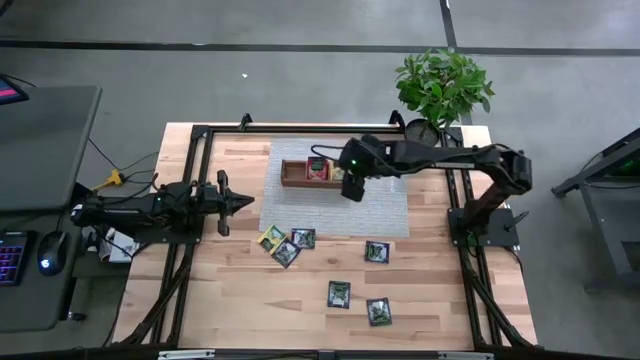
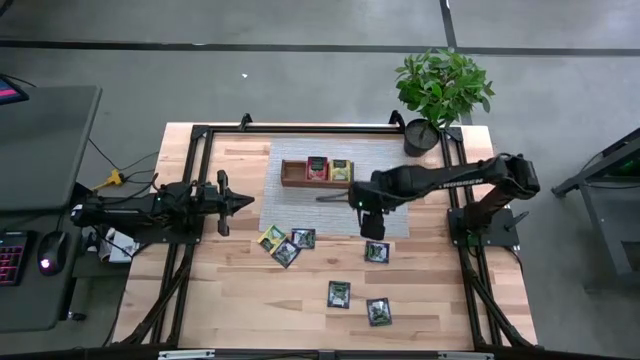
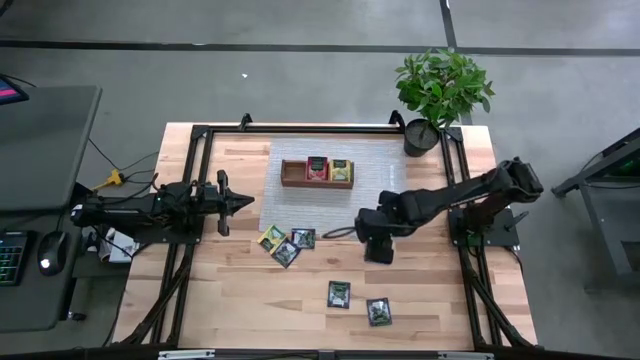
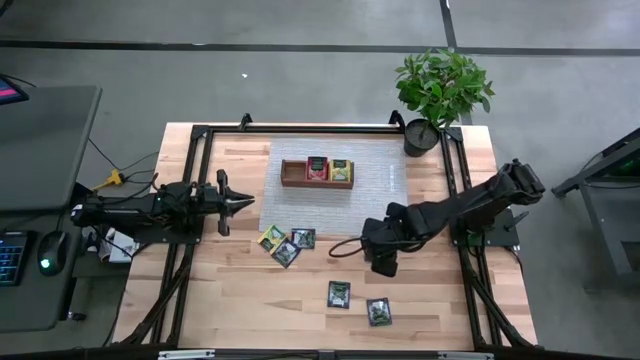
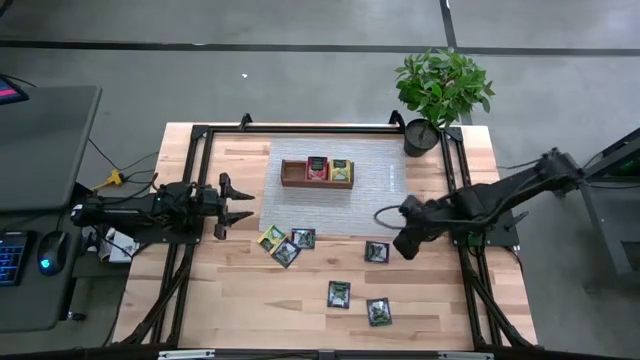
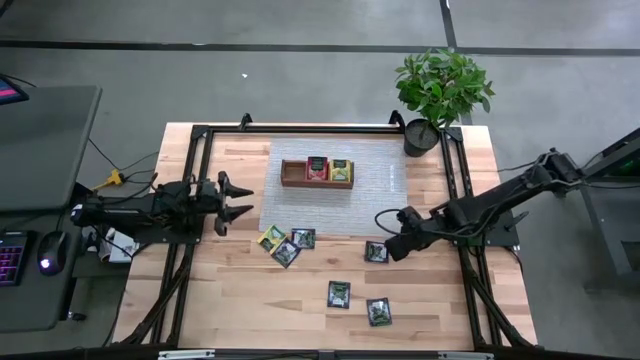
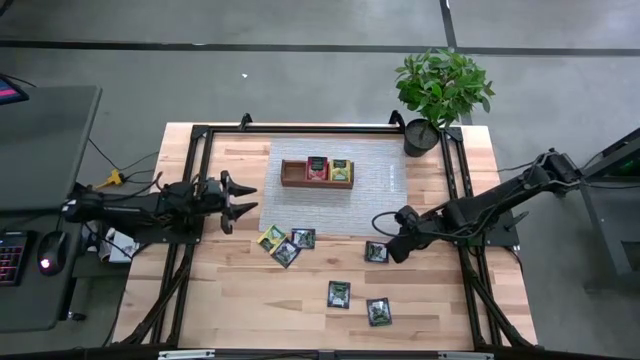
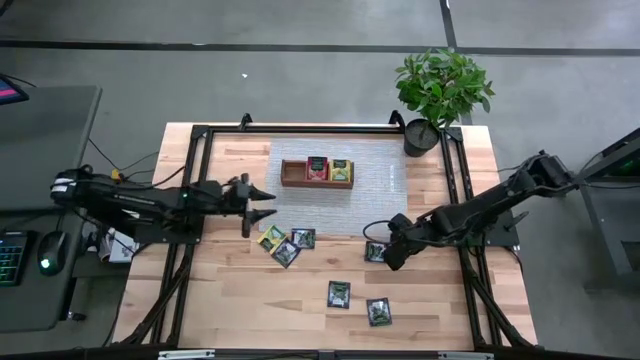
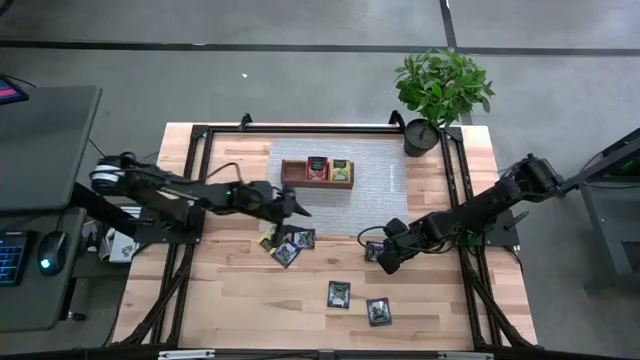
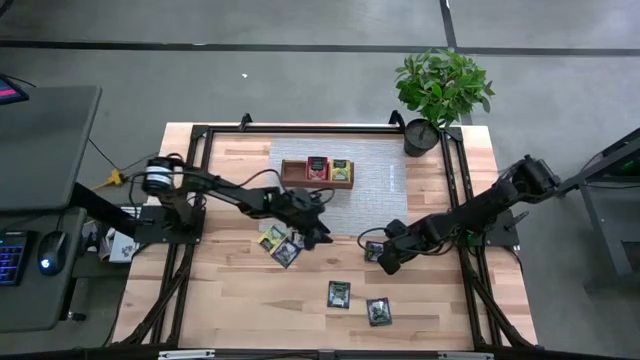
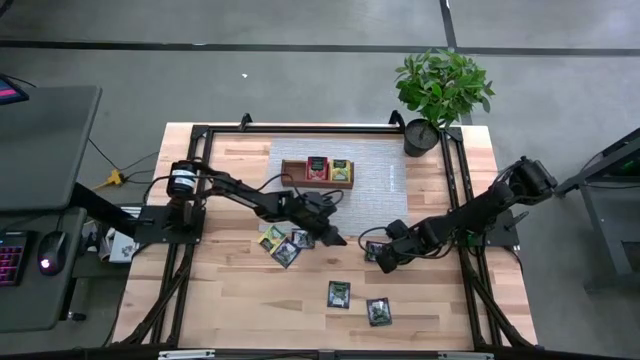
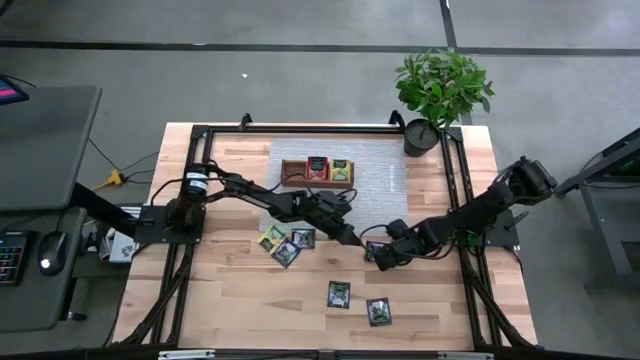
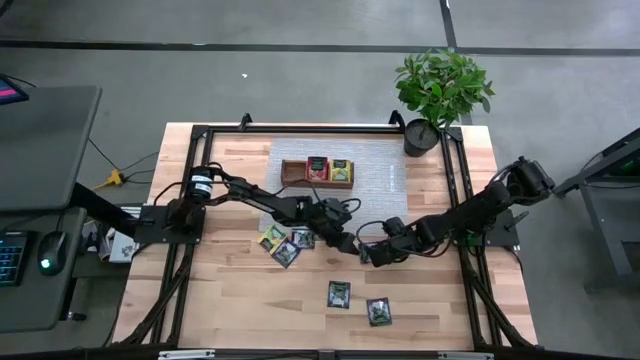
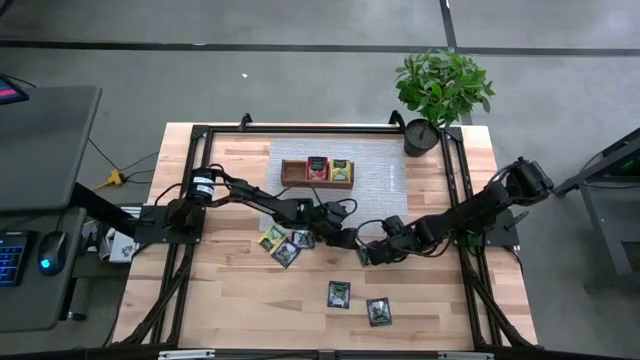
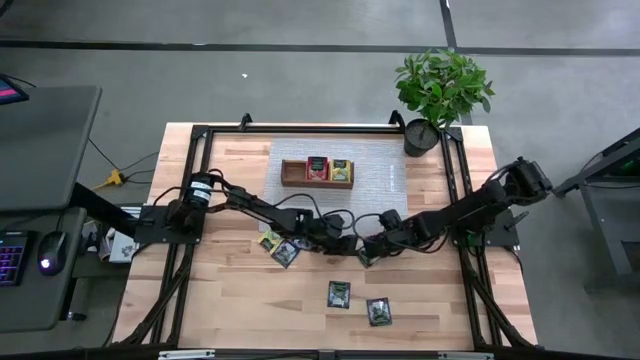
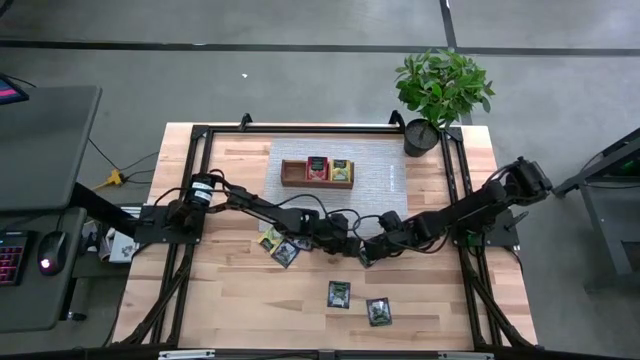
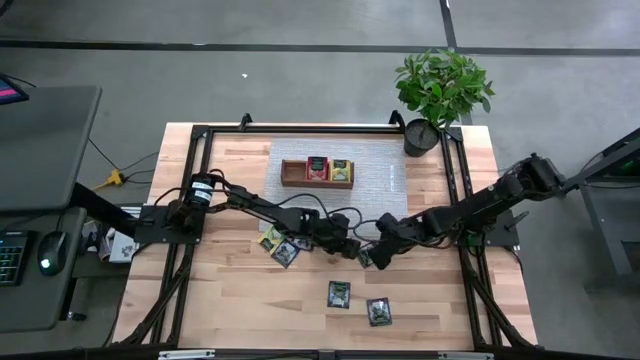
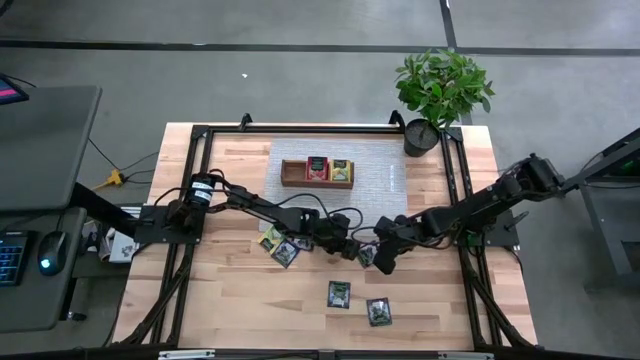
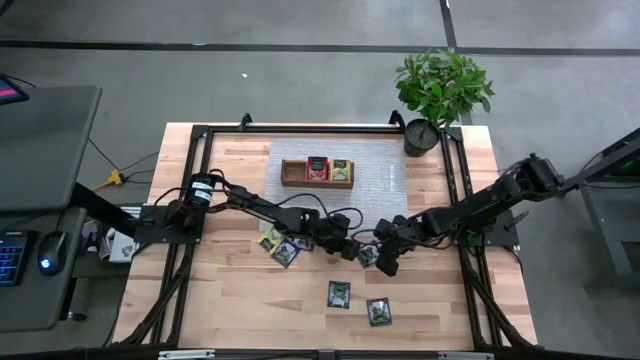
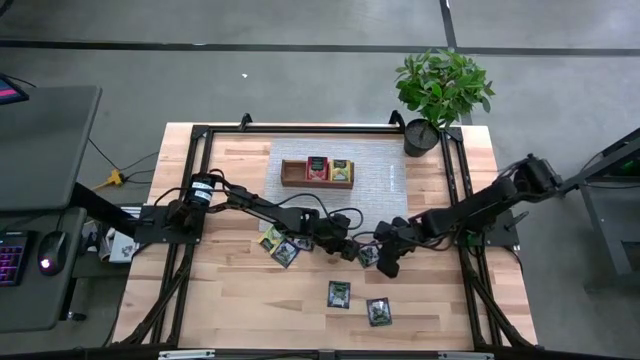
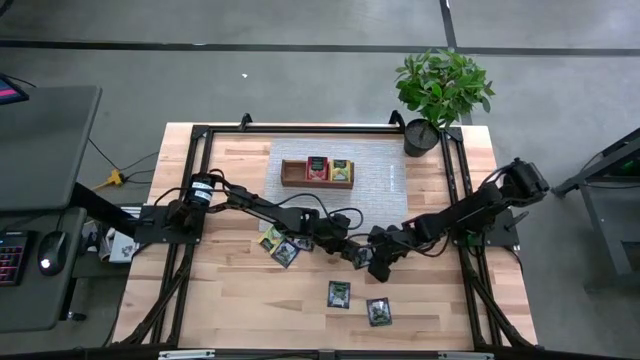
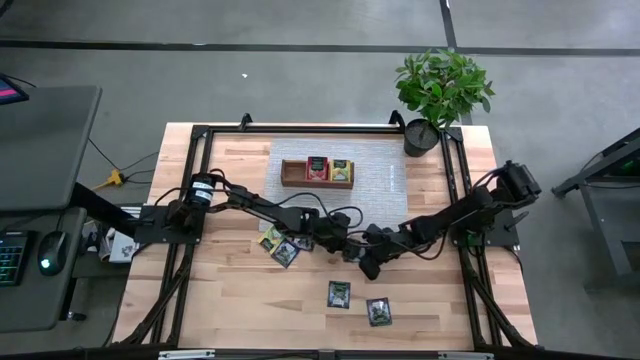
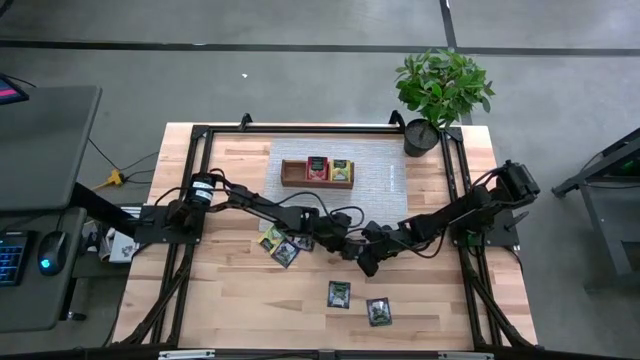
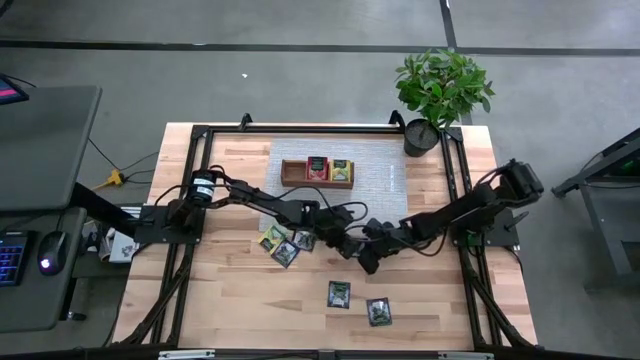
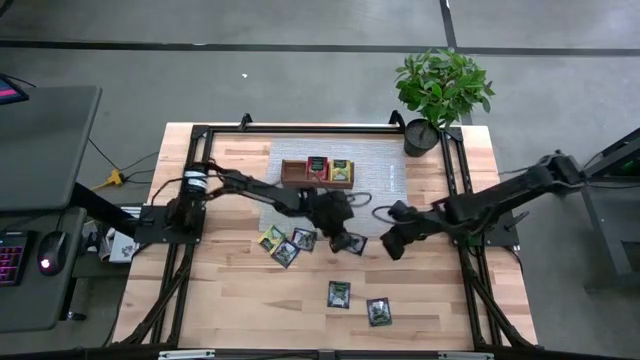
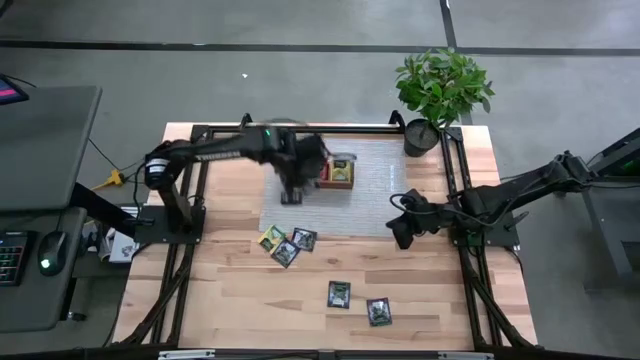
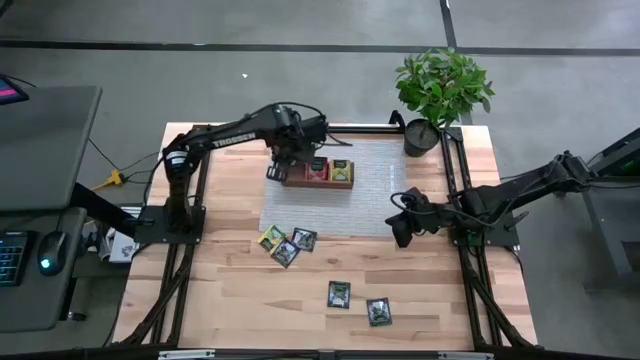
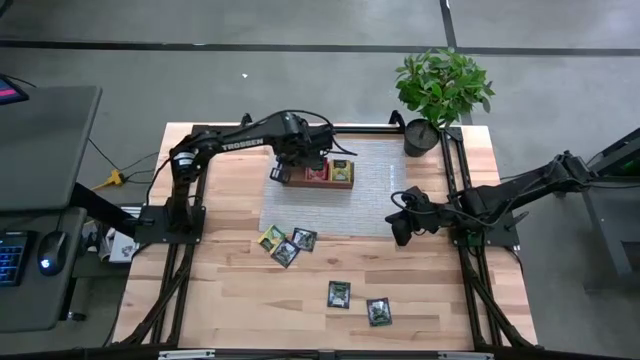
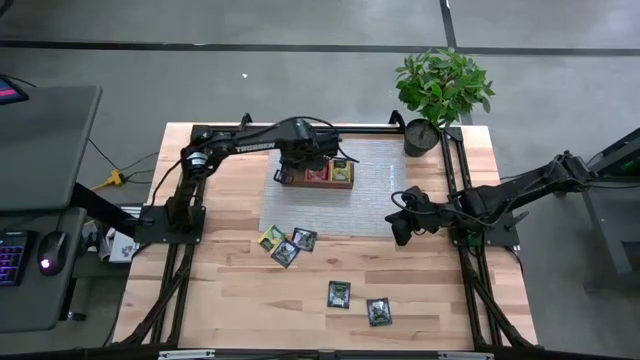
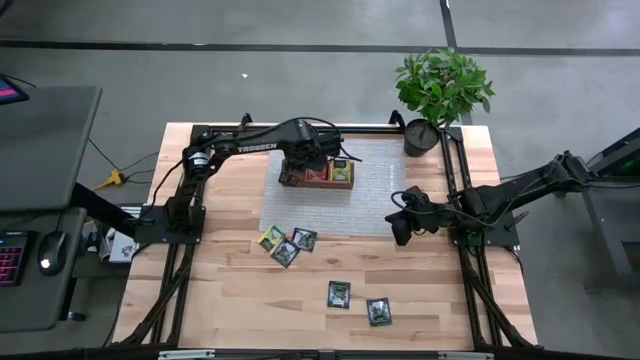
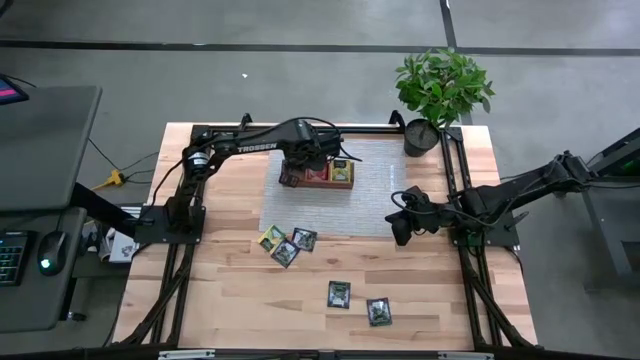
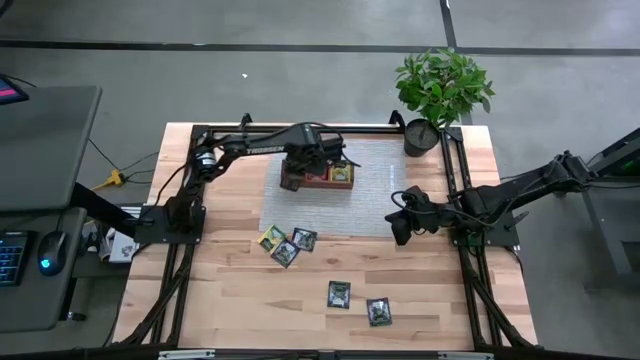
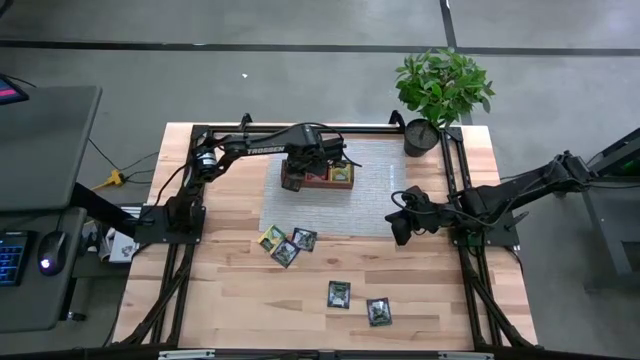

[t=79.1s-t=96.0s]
Task: Pick & Place Tea
Put the purple tea bag into the left section of the wooden organizer

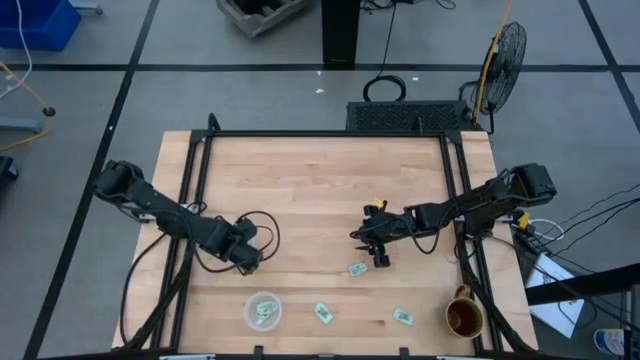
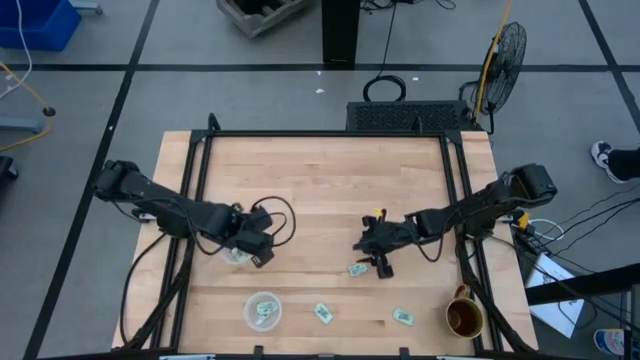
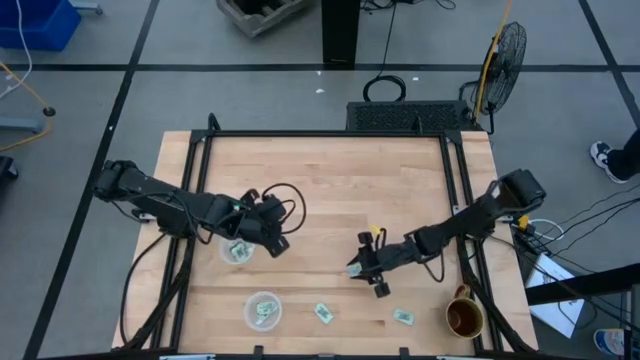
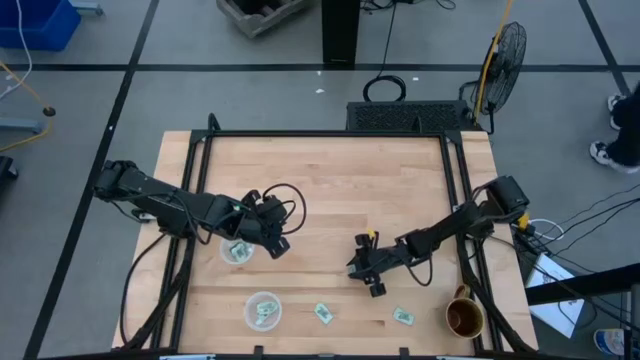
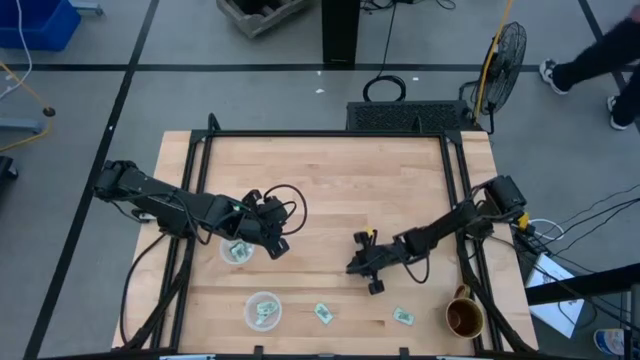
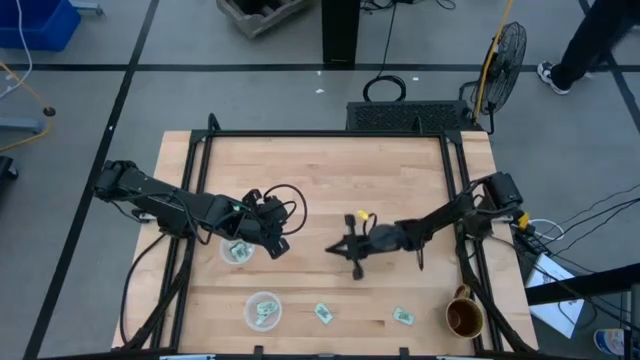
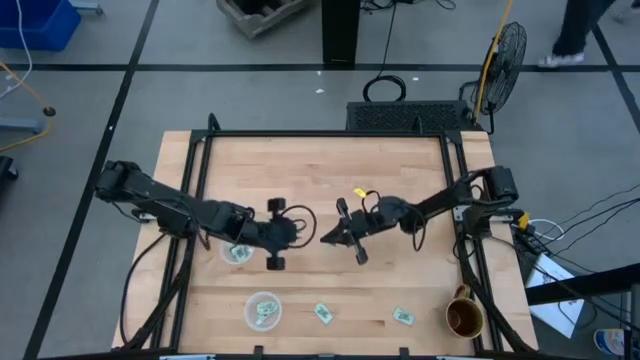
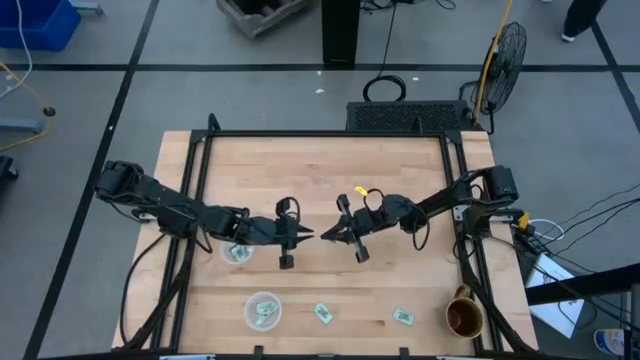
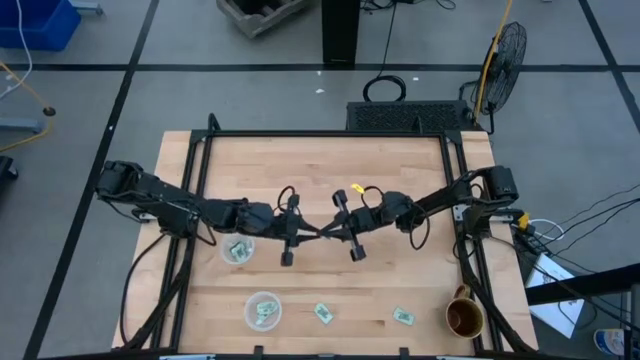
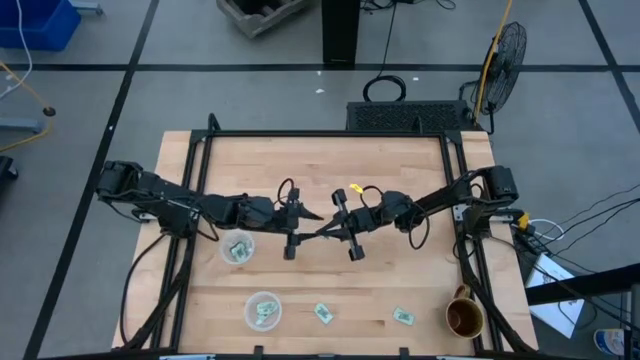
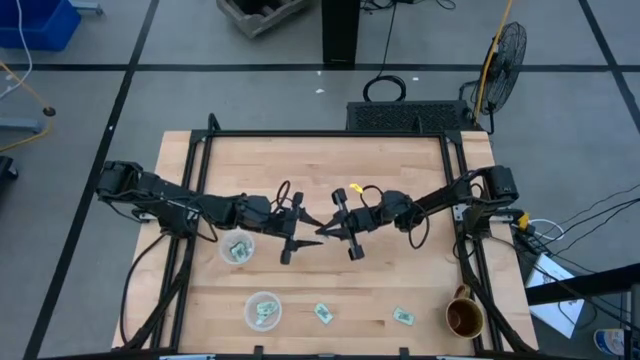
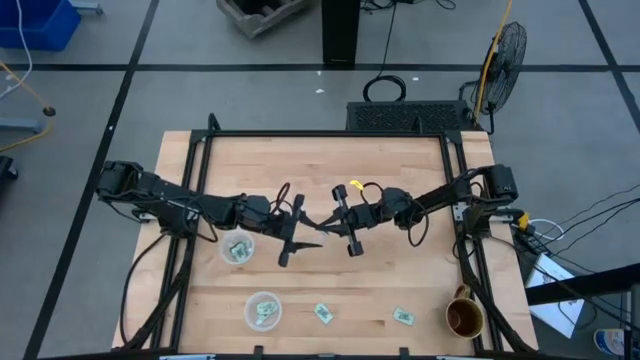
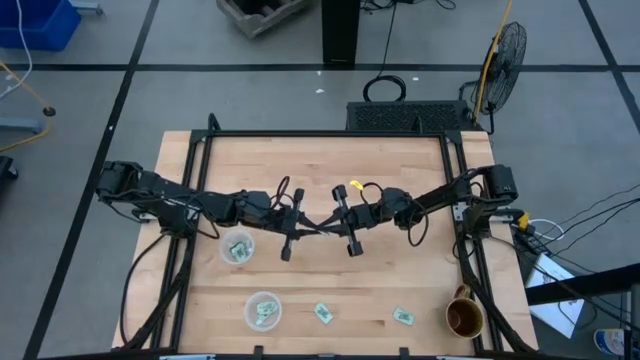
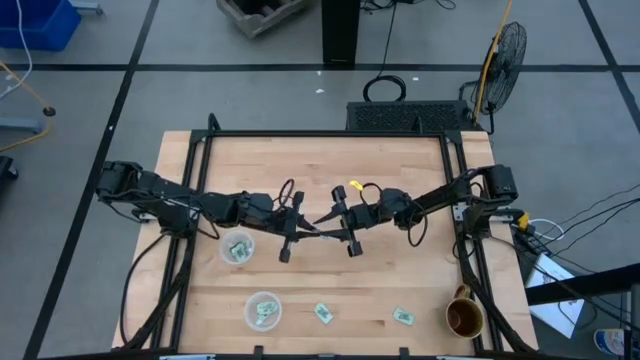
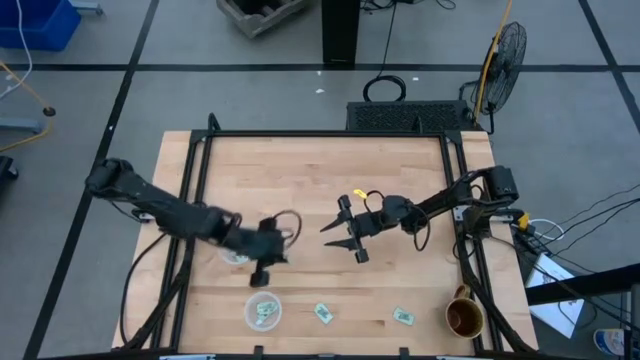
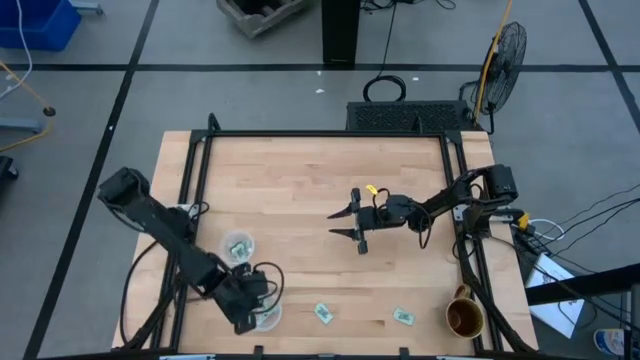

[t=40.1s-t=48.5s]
Task: Pick and place Stevia / Truvia into bins
Put the stevia packet into the bottom container
